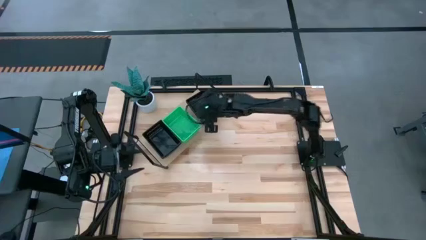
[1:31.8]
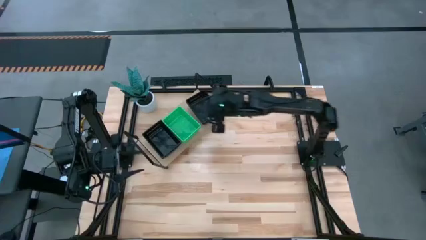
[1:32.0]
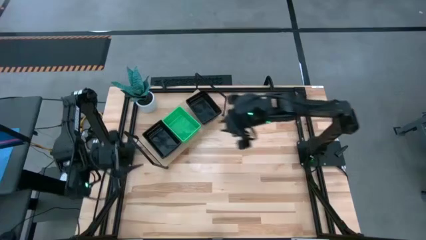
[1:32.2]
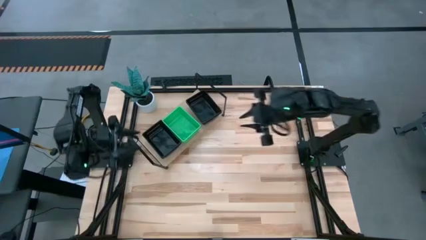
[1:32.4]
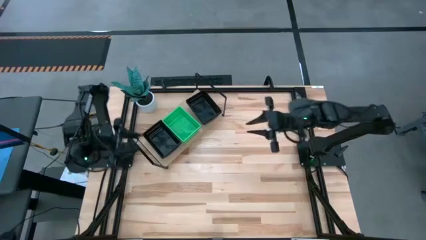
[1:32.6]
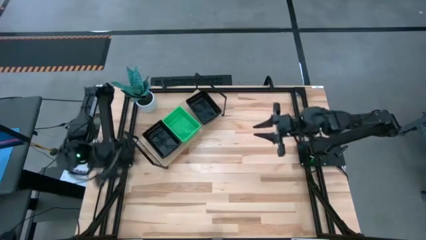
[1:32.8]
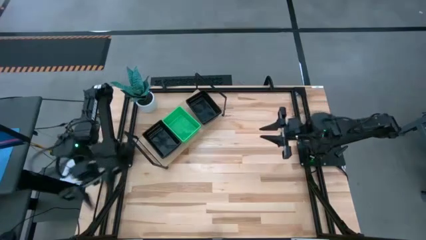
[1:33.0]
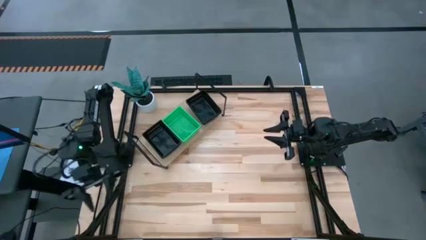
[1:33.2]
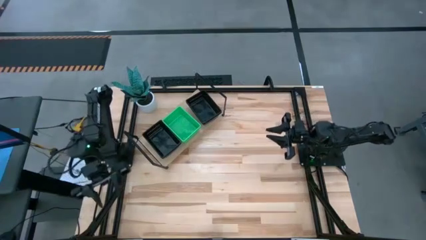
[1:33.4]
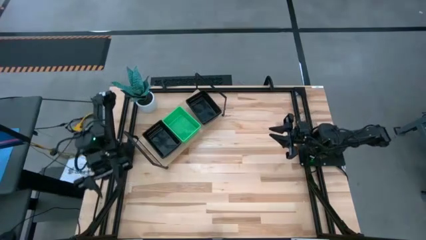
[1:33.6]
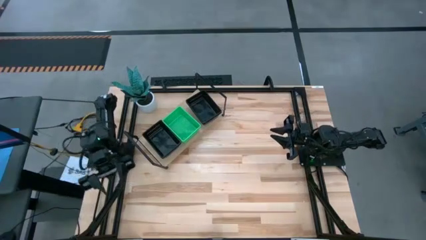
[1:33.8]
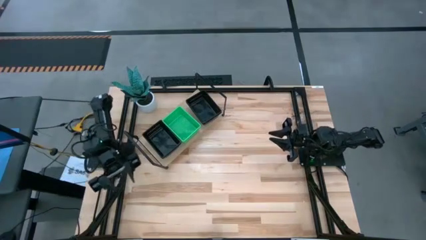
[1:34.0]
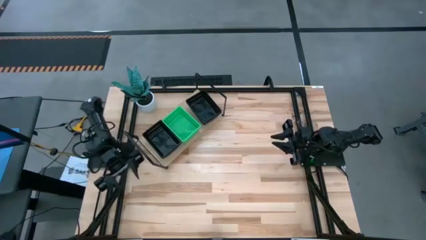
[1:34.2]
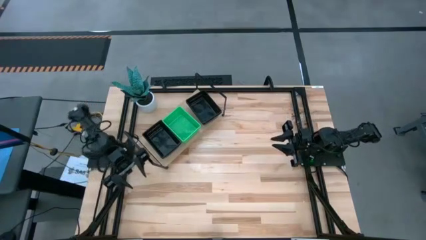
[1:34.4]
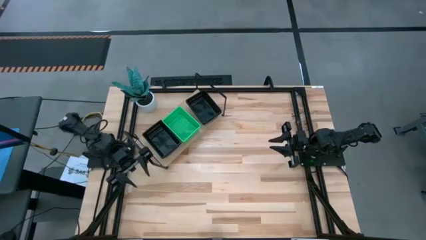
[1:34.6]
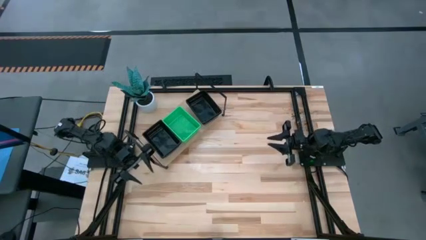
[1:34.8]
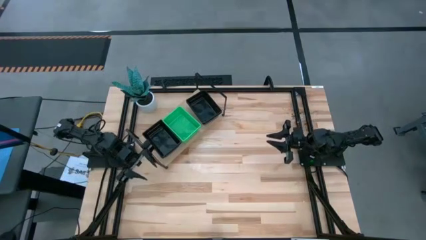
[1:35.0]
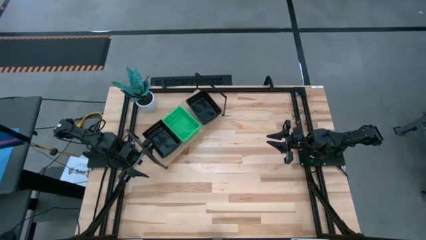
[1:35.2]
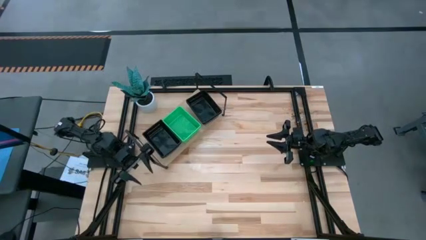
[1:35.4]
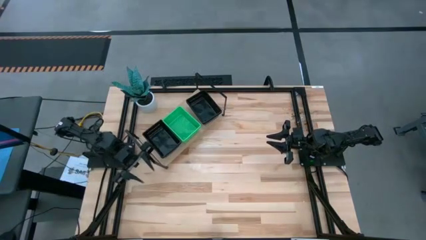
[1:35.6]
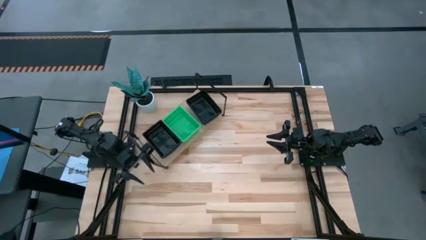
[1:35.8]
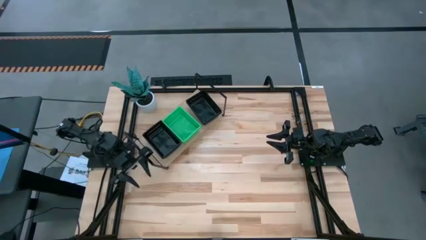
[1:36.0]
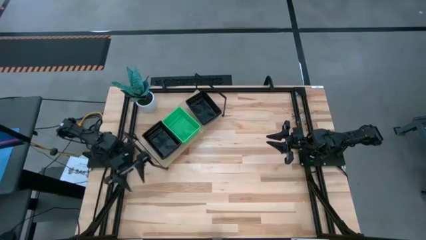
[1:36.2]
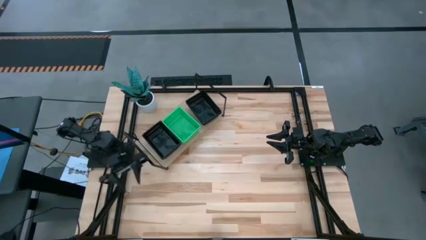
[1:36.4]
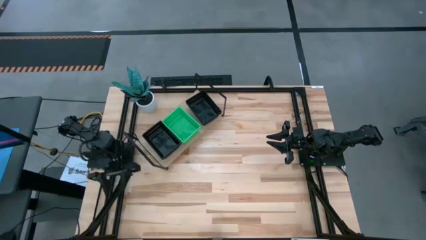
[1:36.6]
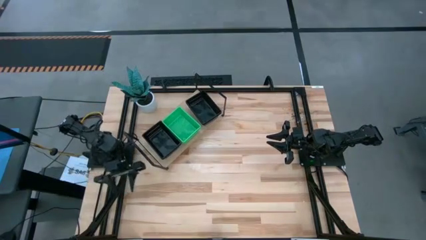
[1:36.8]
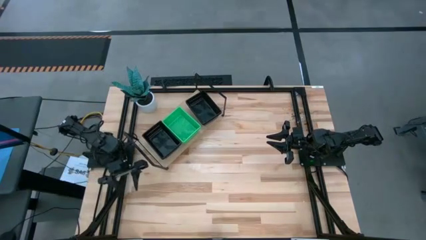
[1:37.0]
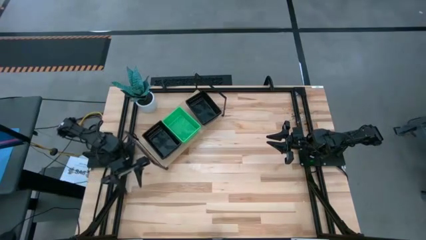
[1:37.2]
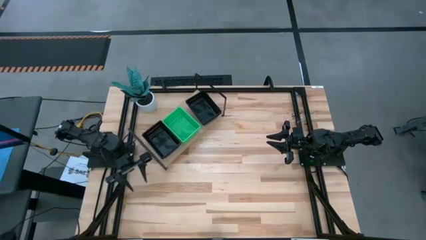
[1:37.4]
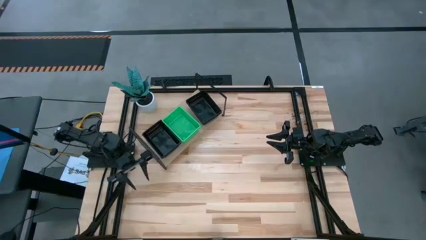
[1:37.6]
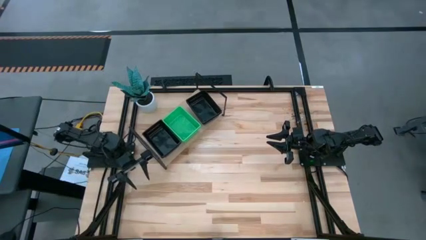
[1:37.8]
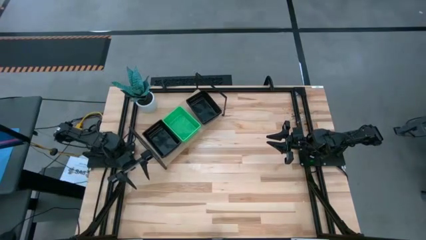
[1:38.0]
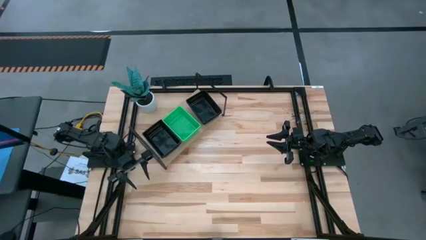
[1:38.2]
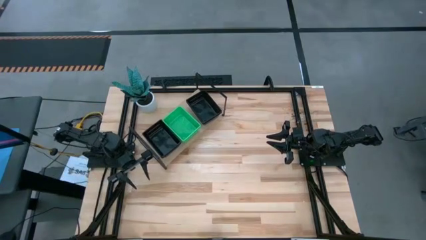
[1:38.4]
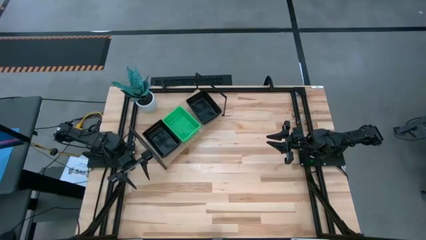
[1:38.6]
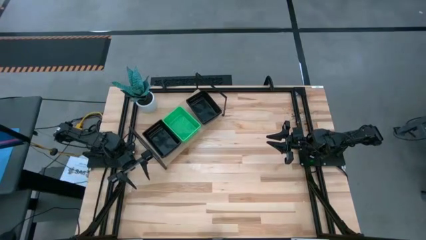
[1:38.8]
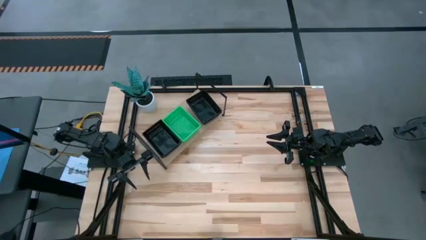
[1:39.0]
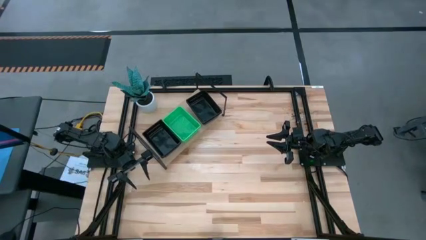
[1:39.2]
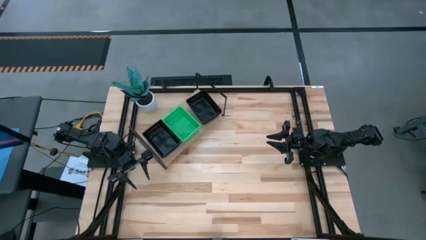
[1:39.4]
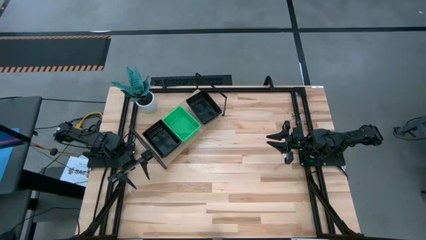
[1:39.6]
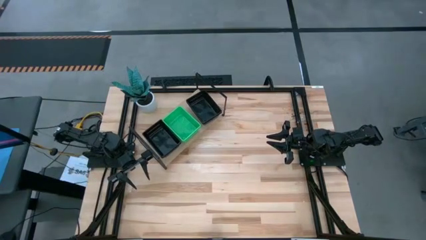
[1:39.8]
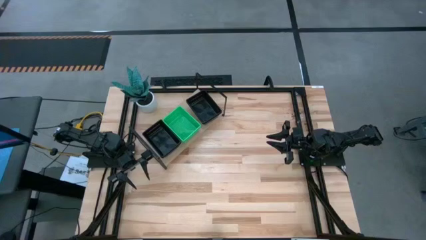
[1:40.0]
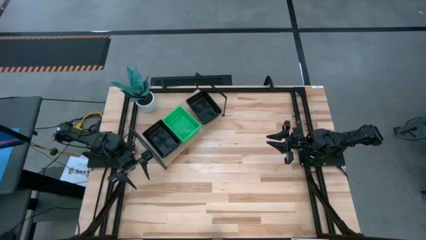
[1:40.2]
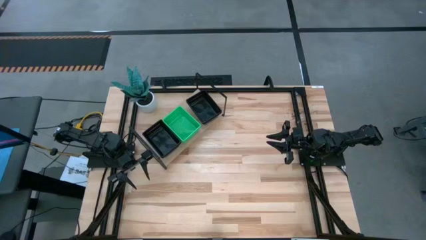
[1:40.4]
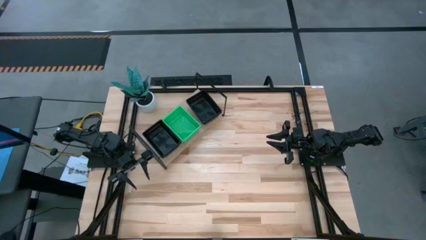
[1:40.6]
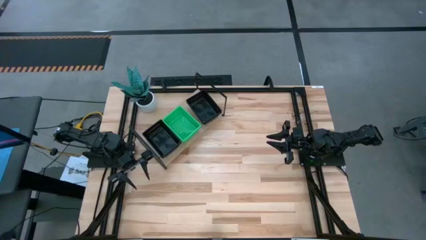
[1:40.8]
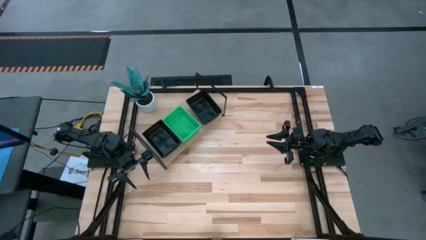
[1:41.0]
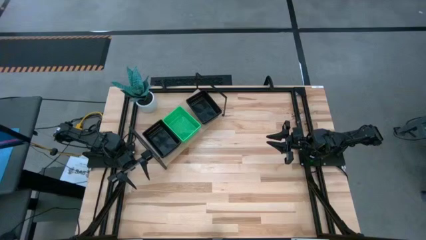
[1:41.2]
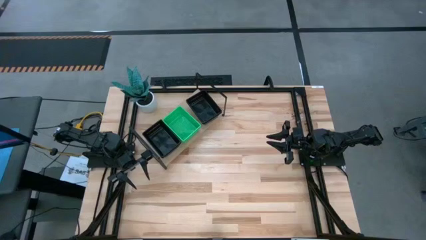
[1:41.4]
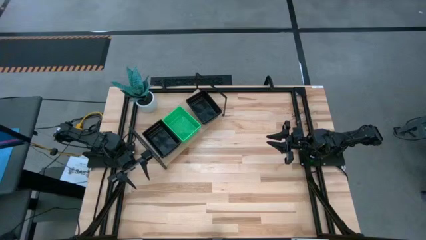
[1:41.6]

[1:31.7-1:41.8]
Task: Stack baskets on shelf by color
Return to Home Position

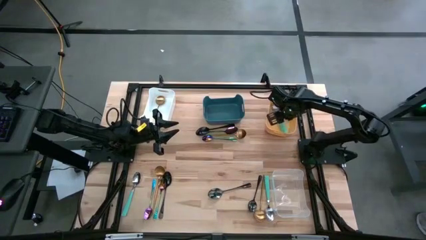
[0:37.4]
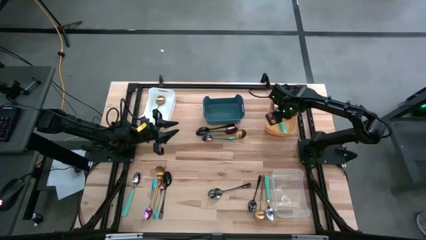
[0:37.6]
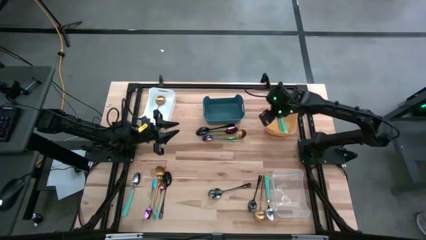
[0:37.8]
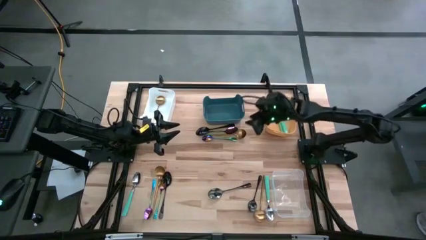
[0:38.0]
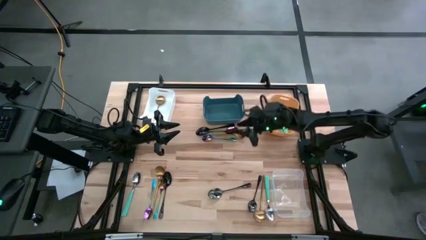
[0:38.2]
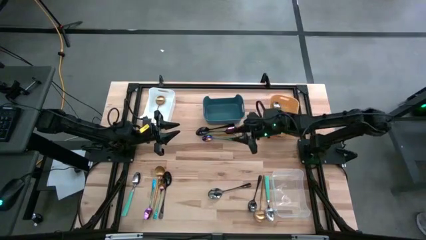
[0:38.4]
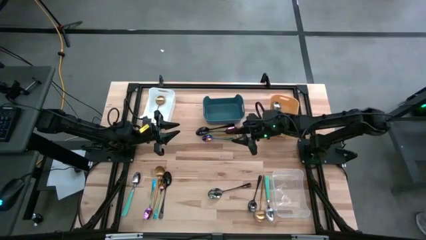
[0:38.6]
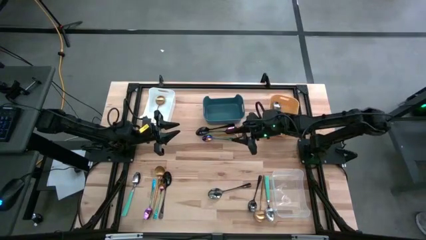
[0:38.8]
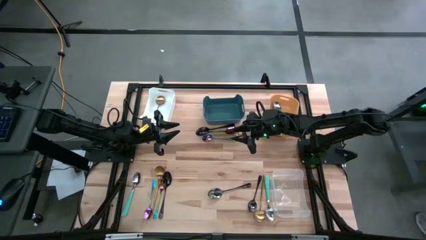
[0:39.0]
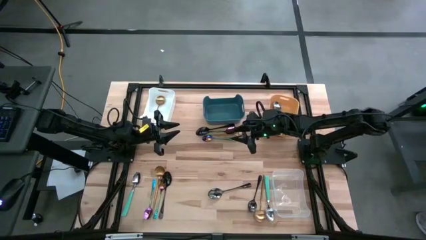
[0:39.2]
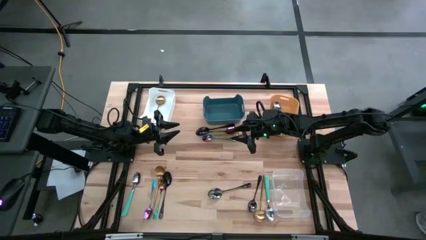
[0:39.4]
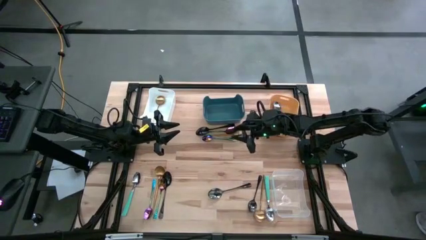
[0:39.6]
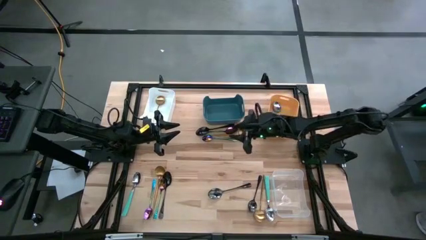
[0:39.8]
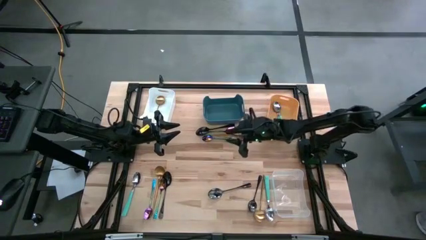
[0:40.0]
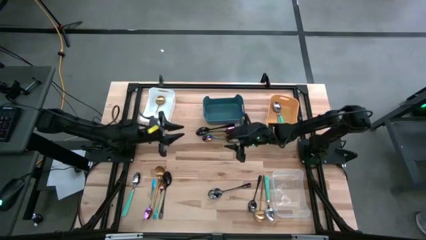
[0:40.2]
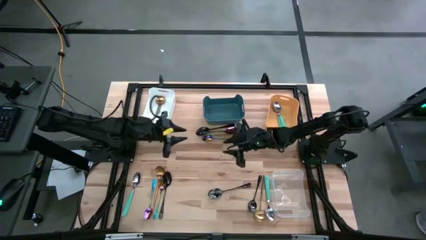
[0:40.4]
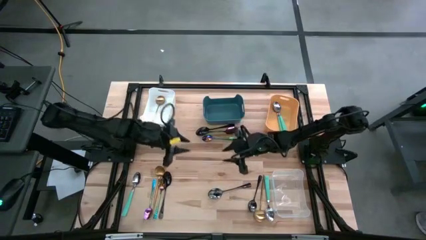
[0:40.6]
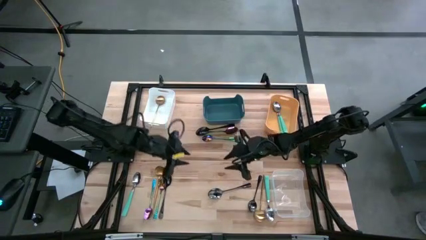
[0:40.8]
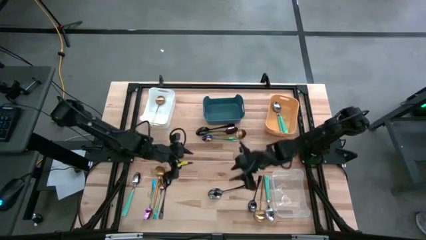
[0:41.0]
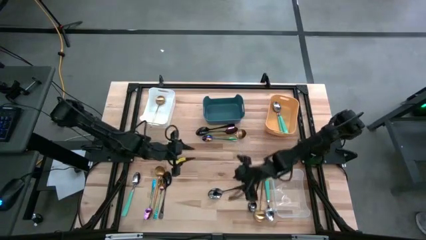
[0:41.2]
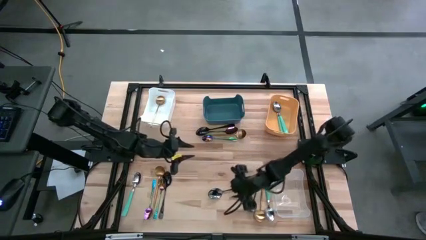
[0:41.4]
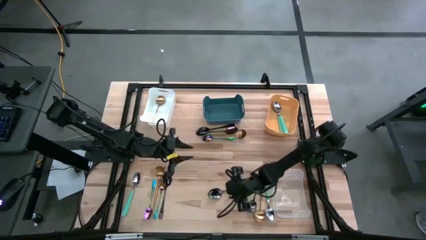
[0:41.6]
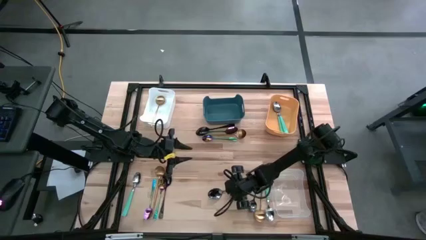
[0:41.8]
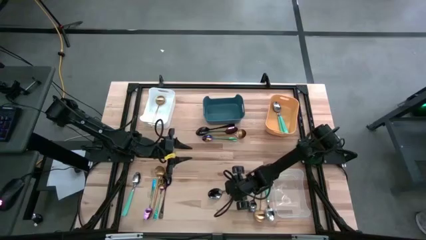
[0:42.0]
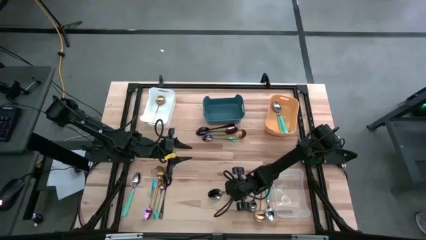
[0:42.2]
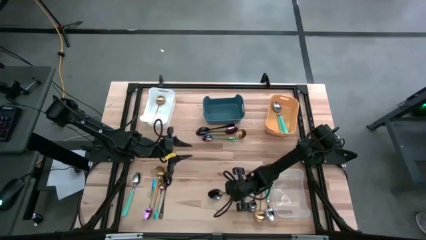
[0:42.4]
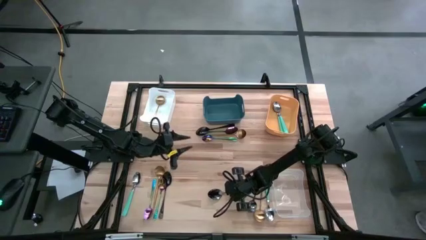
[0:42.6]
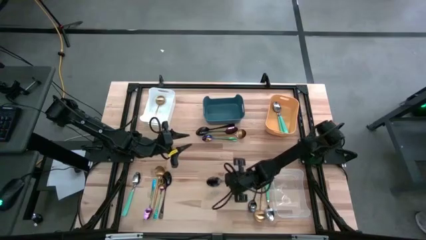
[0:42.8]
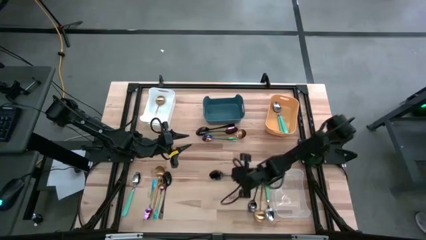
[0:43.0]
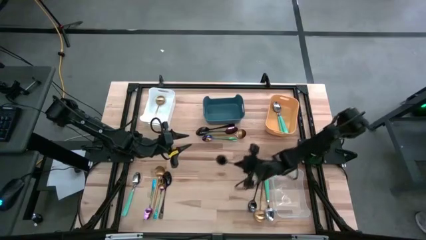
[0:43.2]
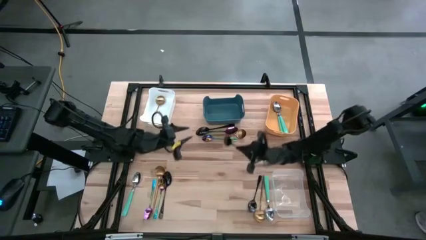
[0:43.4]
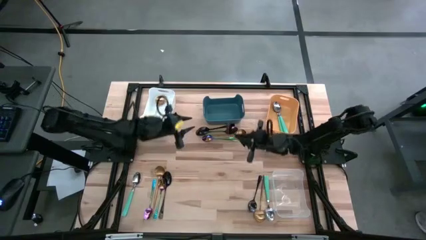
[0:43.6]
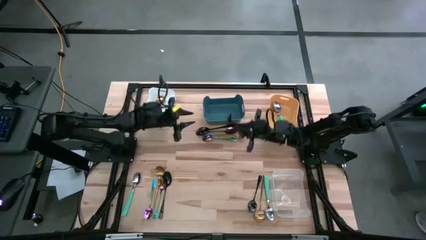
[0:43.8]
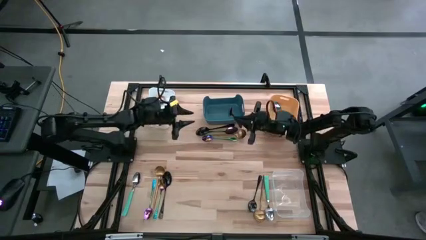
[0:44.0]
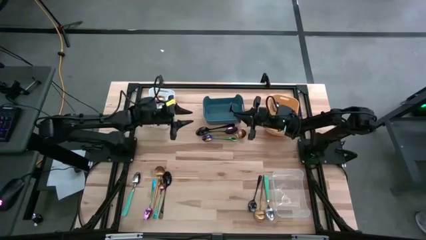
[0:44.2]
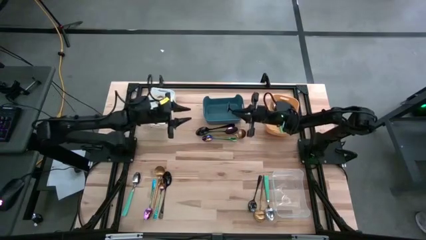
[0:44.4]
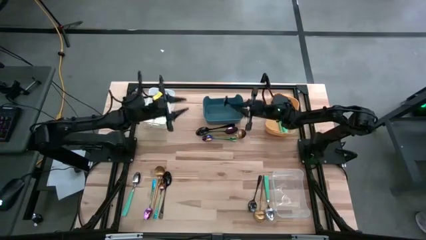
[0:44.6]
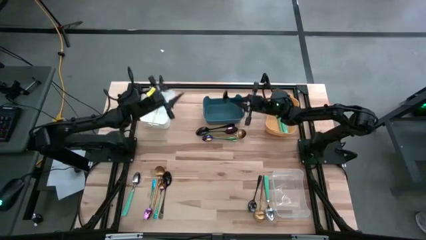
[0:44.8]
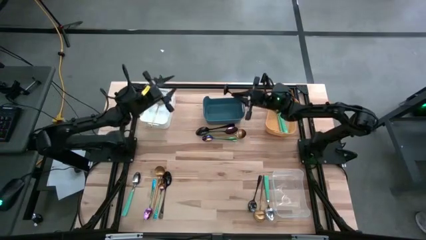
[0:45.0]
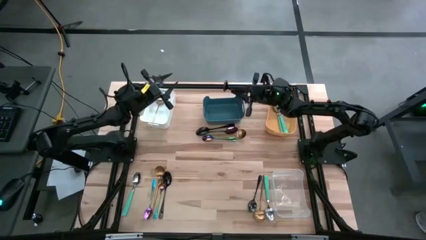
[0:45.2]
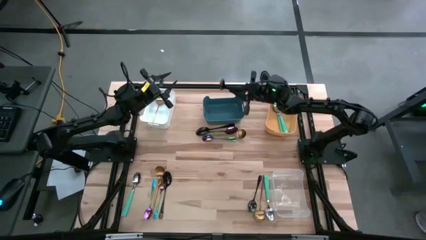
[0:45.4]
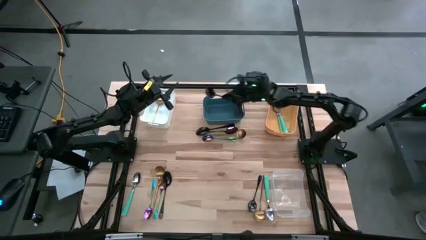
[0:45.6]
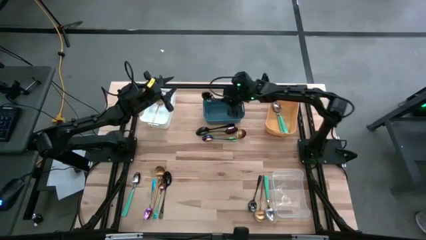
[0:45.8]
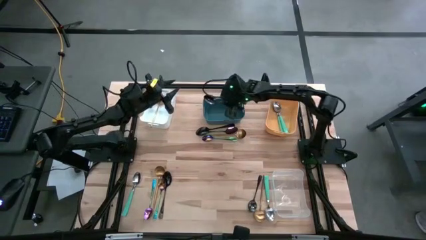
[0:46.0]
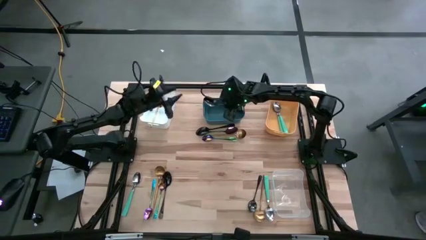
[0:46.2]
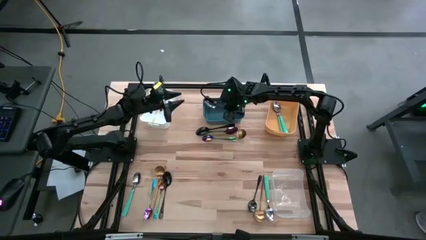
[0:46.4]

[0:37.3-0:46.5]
Task: Sort silverware by color (type)
Put the black spoon into the blue bin
